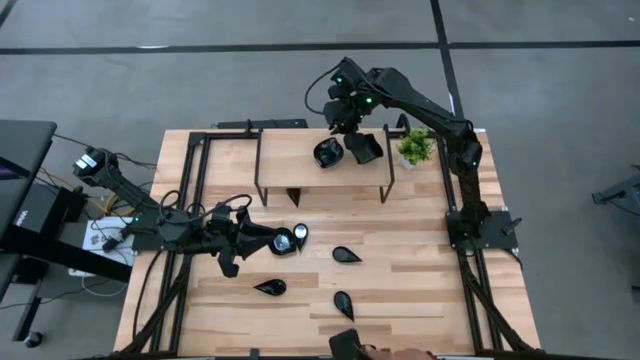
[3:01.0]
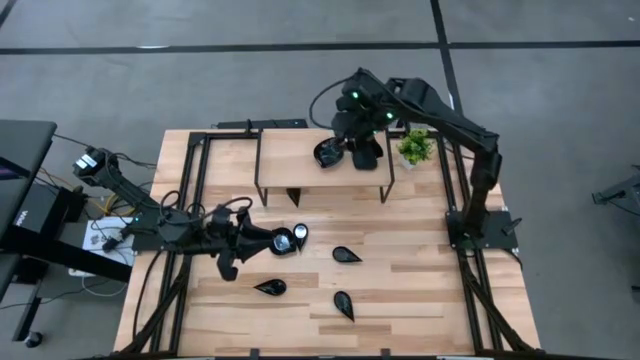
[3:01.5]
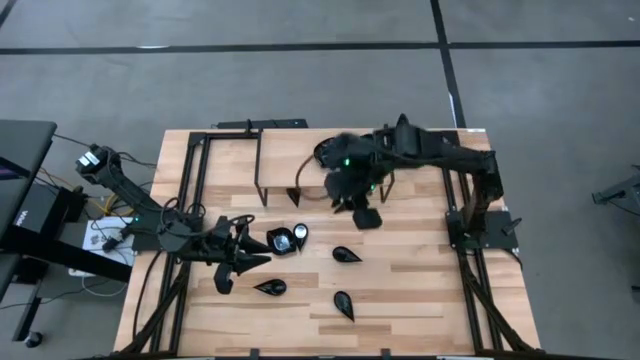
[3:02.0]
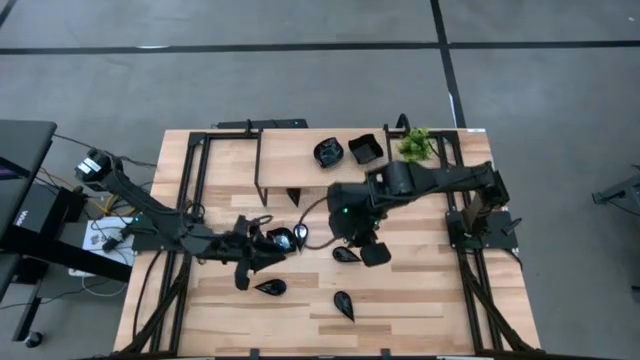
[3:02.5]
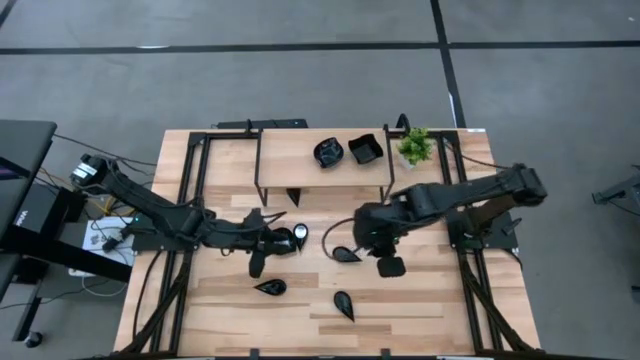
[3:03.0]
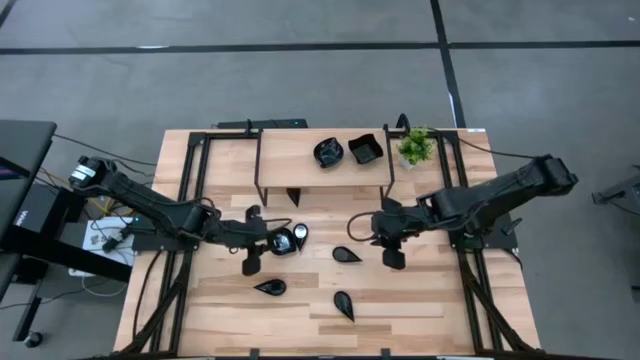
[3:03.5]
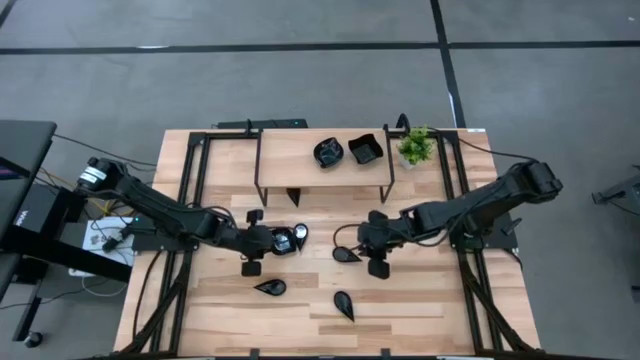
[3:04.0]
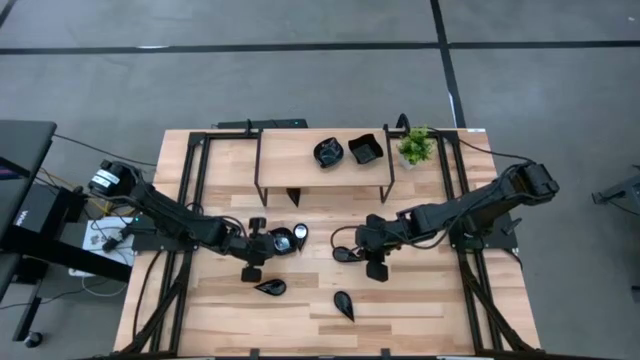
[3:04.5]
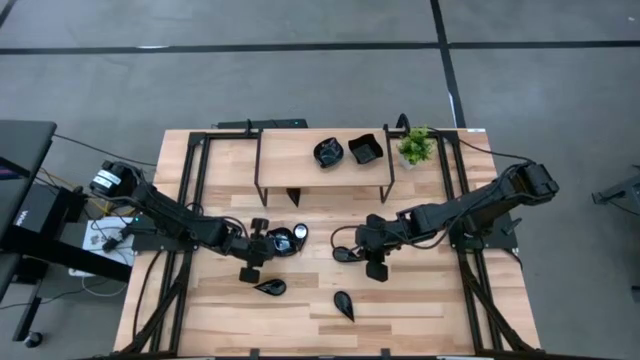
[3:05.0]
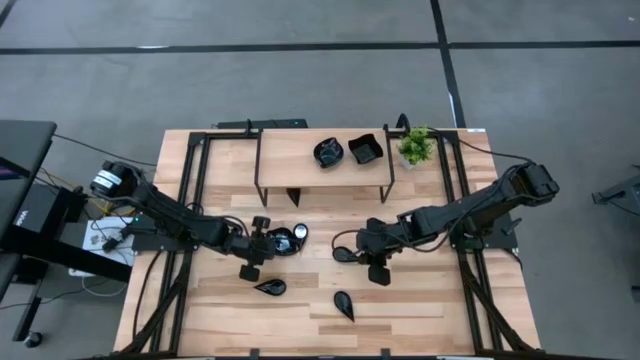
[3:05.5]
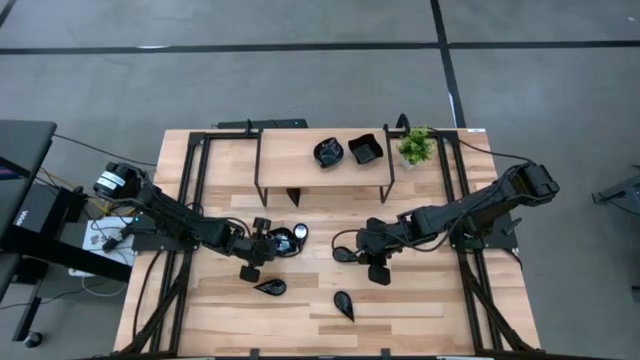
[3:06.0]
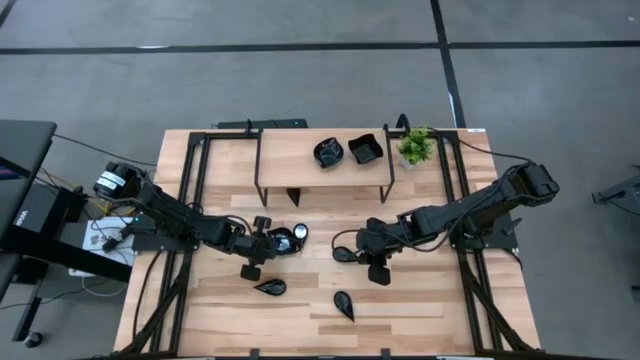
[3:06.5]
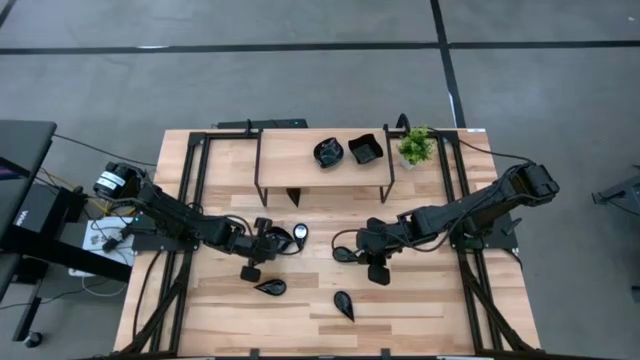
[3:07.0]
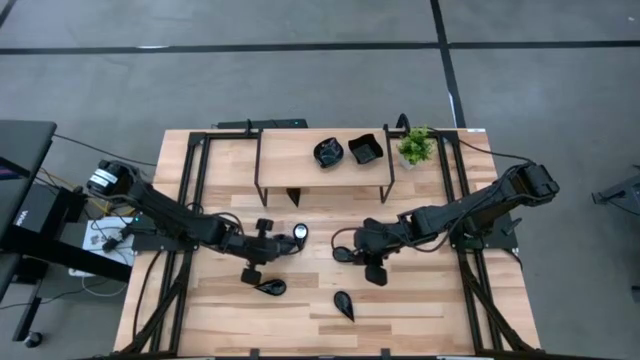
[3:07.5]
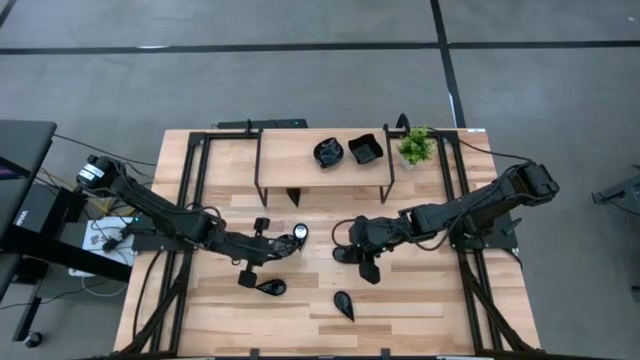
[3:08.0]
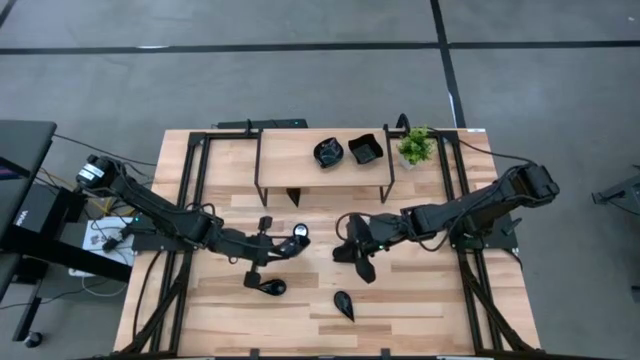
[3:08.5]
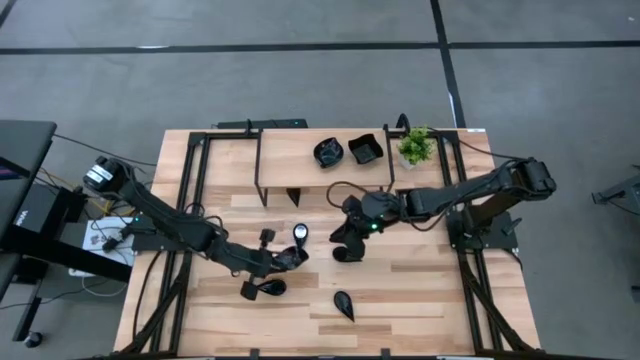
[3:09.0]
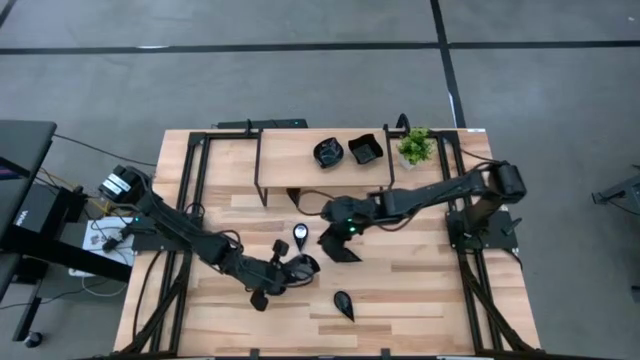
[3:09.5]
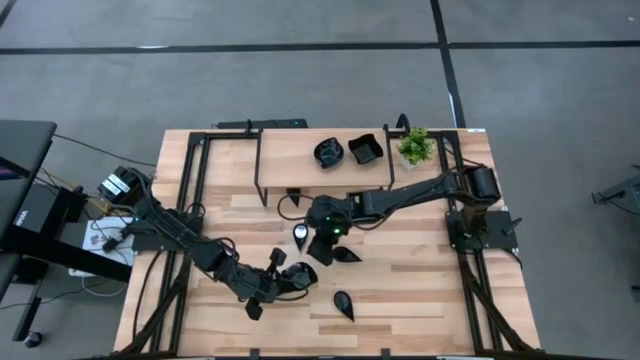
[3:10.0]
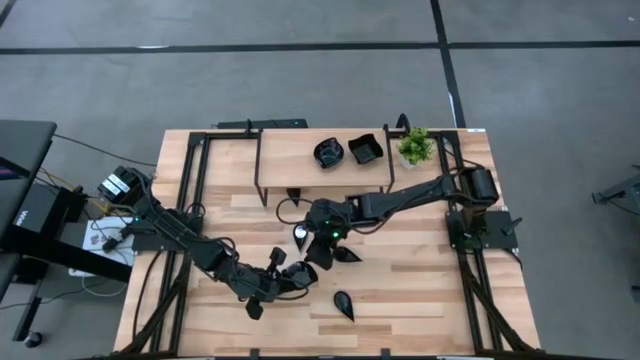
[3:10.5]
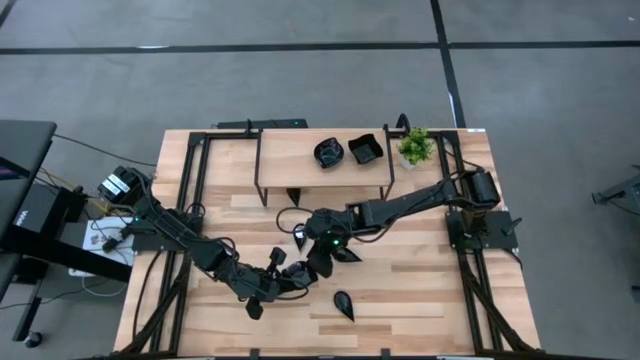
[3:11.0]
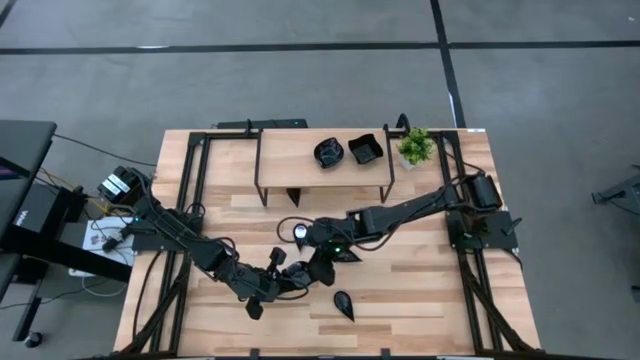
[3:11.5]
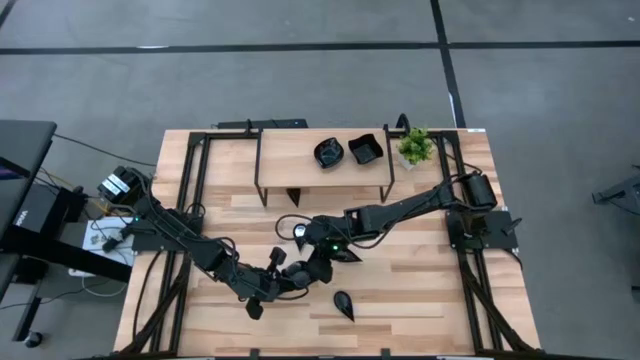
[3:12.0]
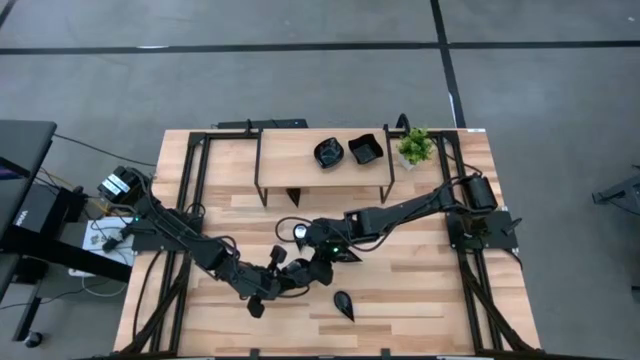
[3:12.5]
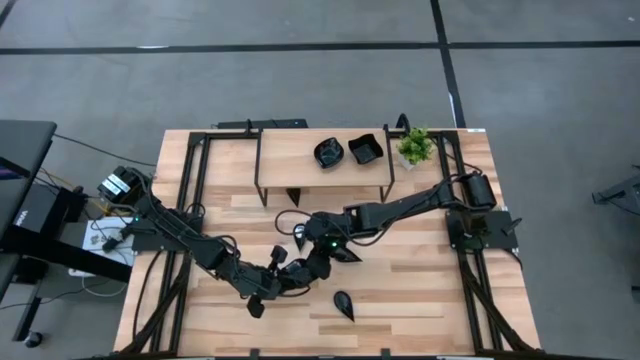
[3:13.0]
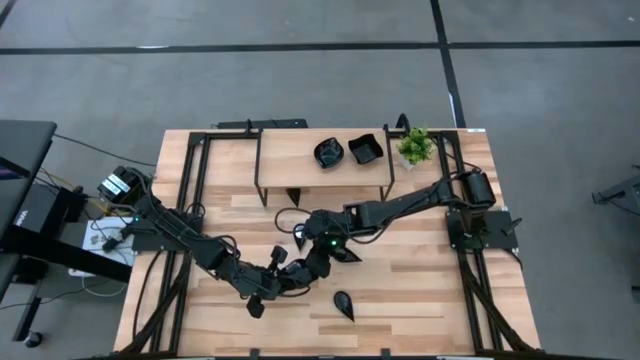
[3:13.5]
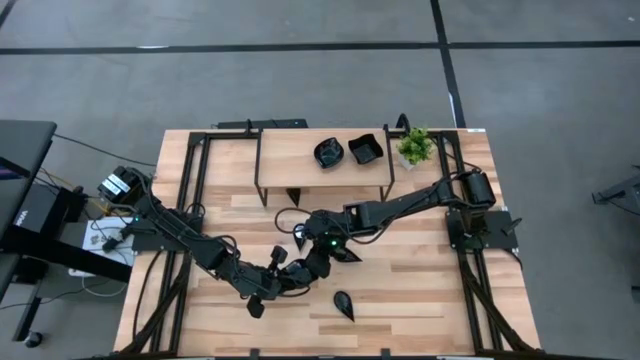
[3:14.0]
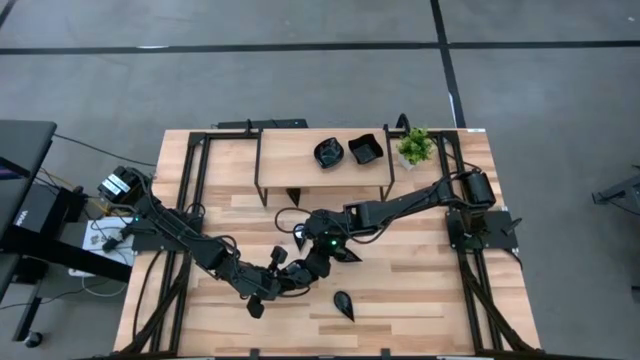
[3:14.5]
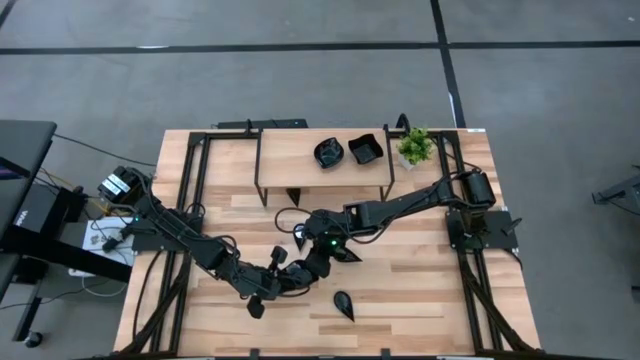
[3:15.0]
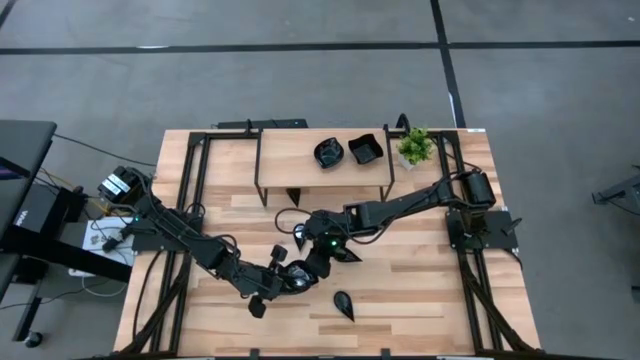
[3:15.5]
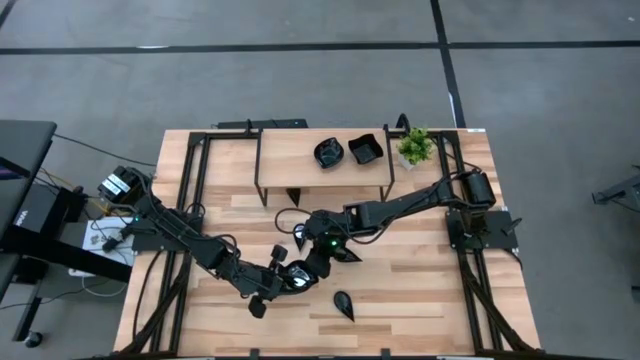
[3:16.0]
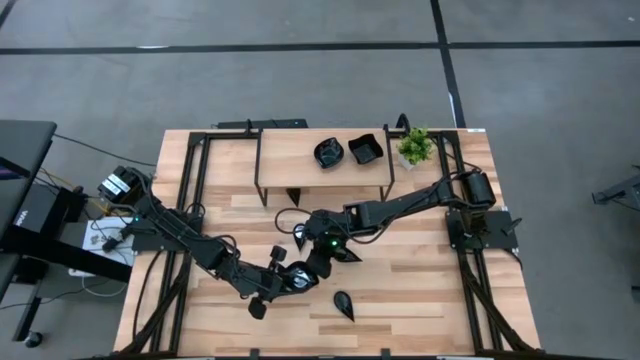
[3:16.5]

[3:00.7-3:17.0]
Task: Pick & Place Mini shaped plates
Stack the black leaf shaped plate on the black leaf shaped plate on the shelf

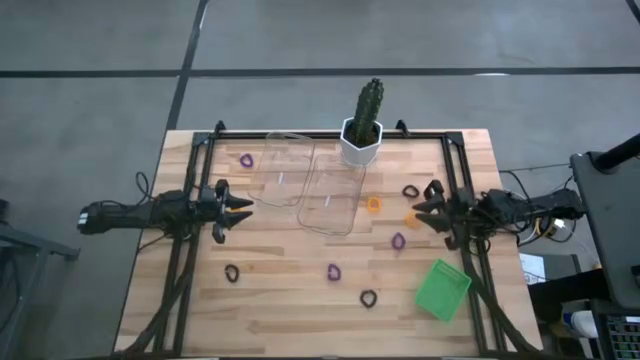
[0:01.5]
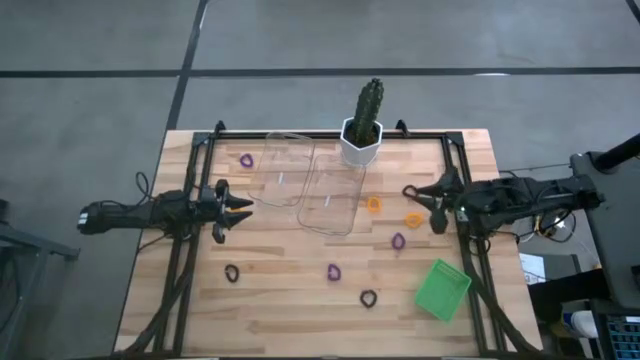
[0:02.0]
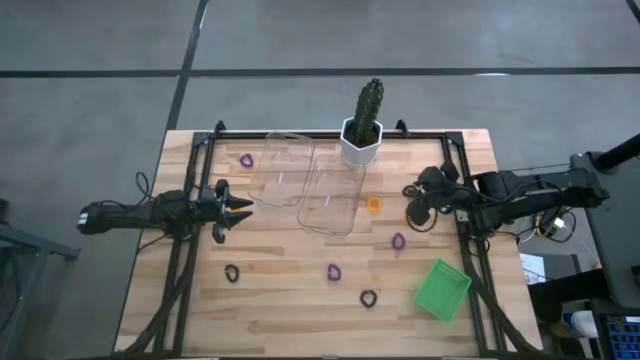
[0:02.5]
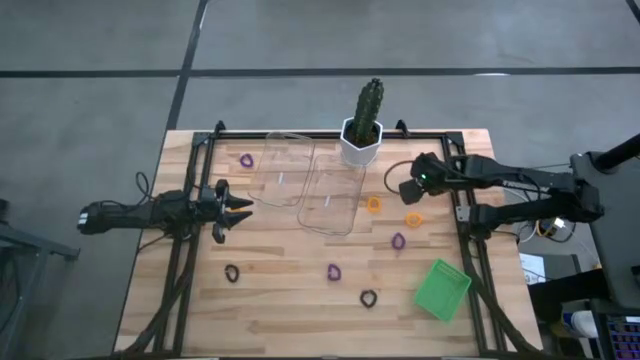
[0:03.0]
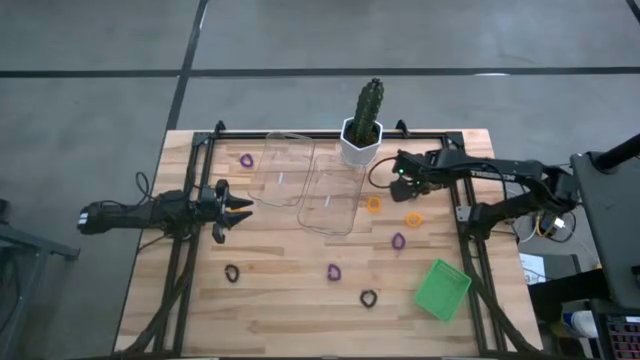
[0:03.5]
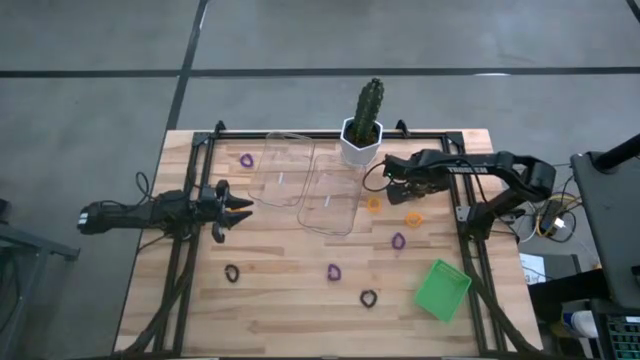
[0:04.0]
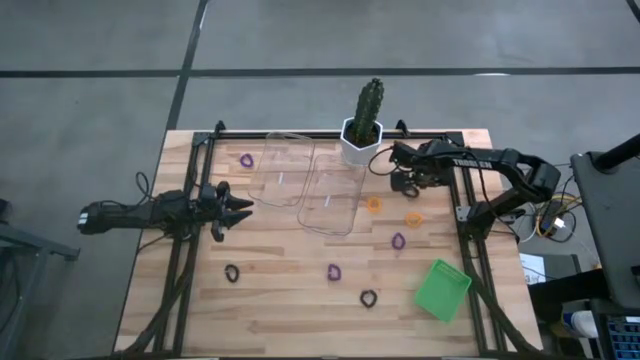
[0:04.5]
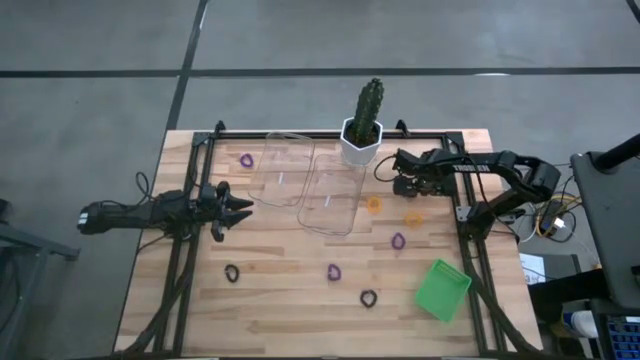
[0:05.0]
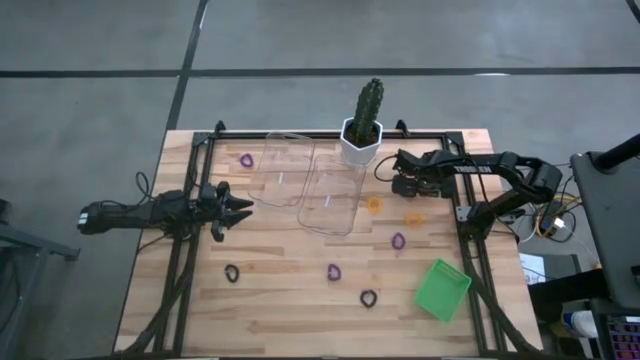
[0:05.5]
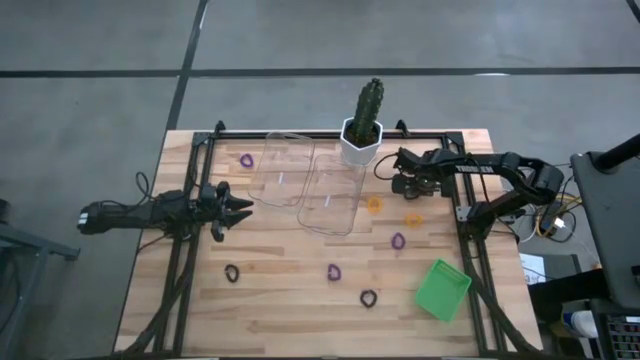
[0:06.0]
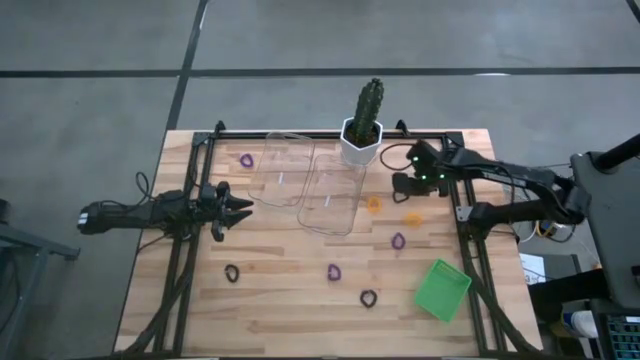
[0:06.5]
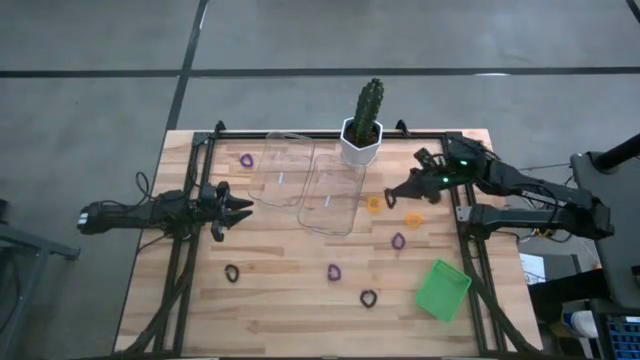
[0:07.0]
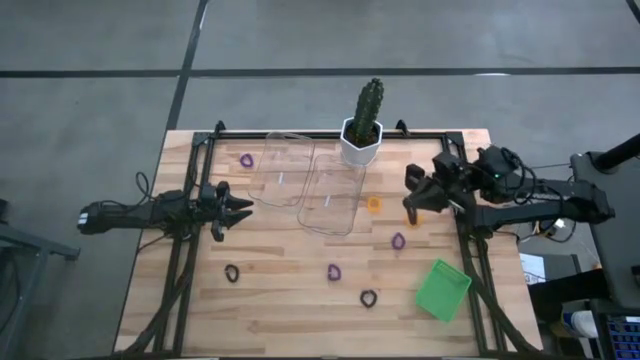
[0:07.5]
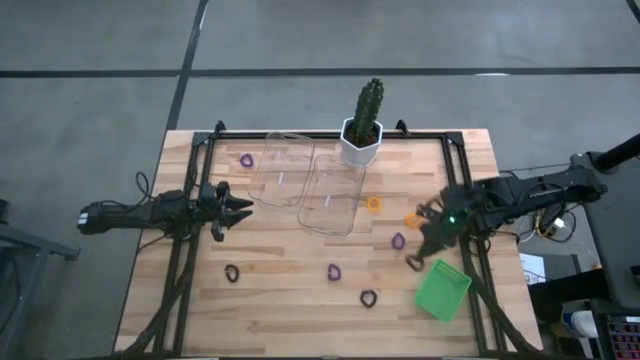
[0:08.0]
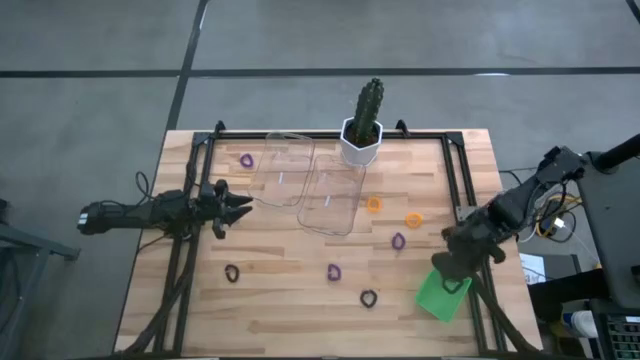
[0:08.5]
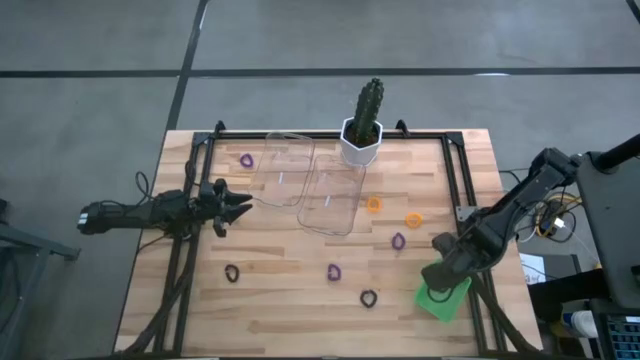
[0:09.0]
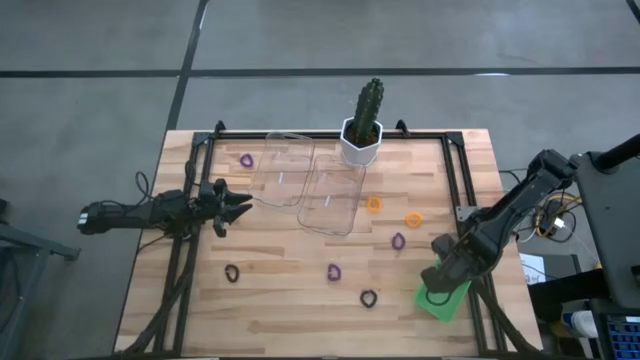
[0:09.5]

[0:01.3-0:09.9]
Task: Sort spring keychains
Put the top right black spring keychain into the green basket
